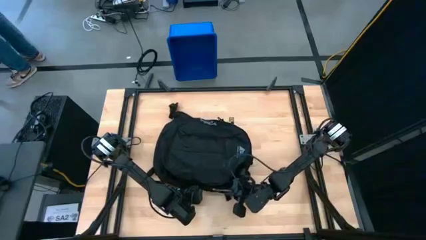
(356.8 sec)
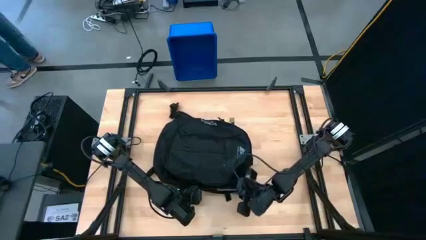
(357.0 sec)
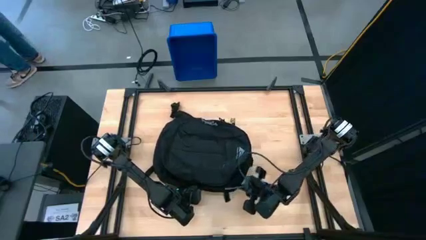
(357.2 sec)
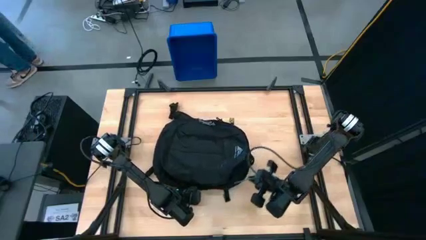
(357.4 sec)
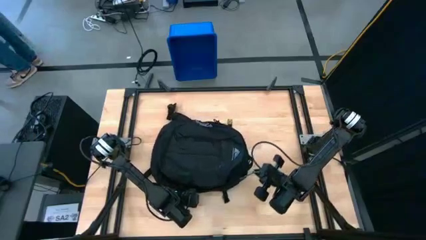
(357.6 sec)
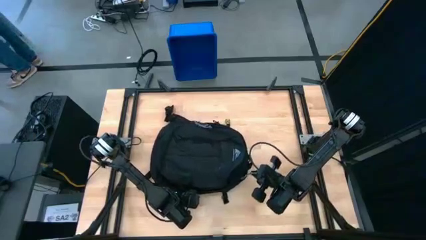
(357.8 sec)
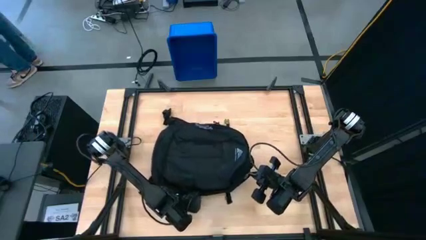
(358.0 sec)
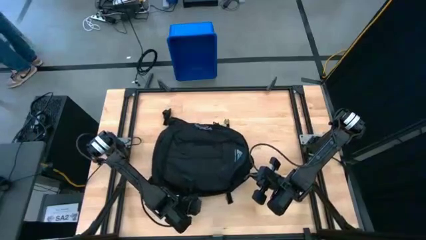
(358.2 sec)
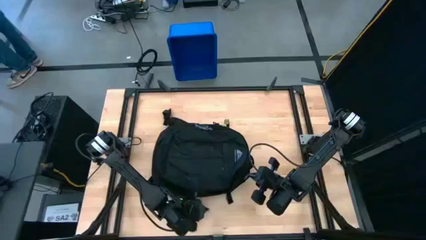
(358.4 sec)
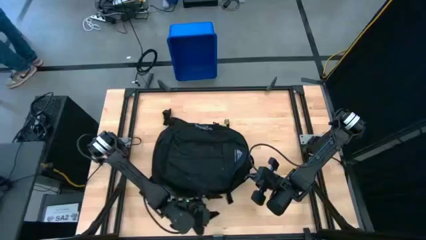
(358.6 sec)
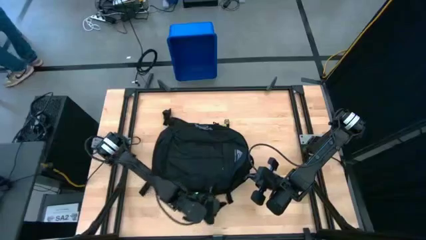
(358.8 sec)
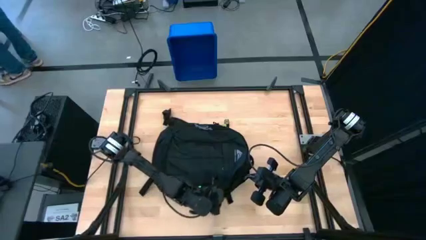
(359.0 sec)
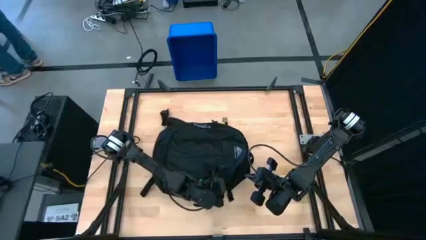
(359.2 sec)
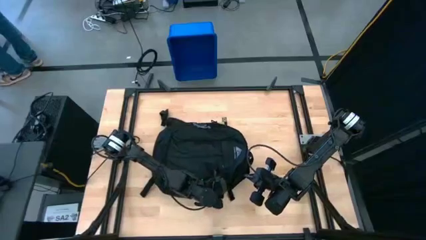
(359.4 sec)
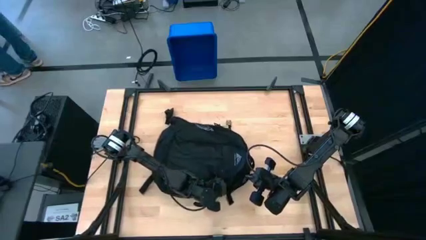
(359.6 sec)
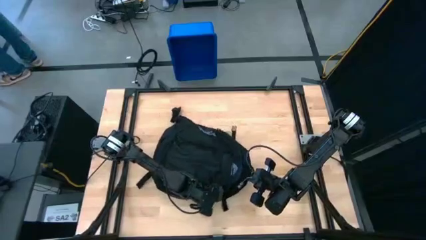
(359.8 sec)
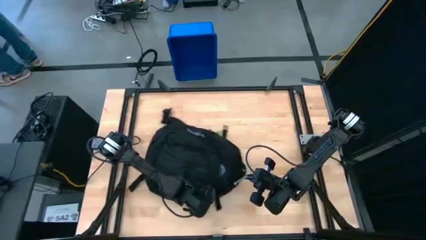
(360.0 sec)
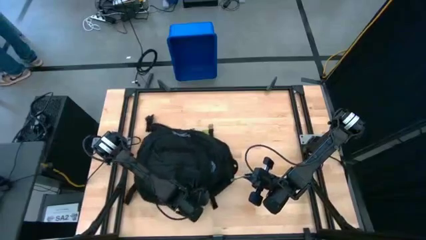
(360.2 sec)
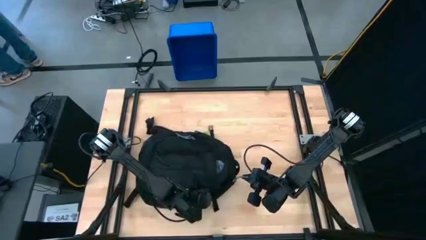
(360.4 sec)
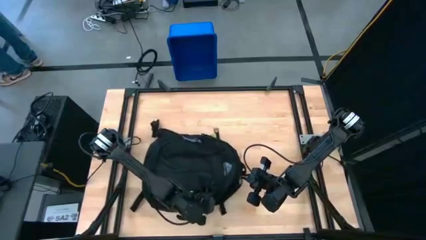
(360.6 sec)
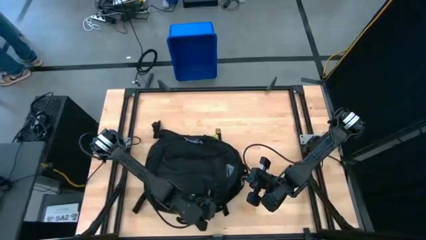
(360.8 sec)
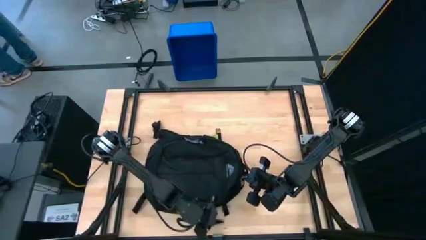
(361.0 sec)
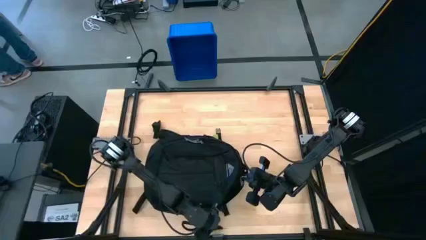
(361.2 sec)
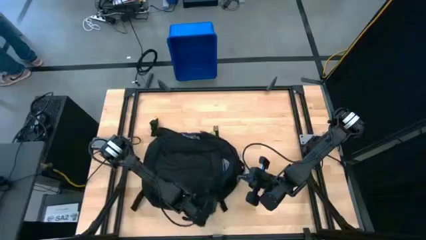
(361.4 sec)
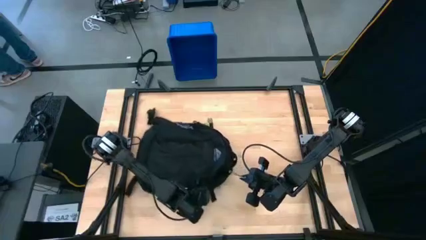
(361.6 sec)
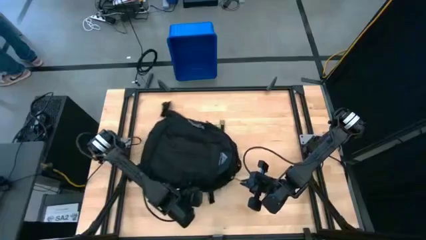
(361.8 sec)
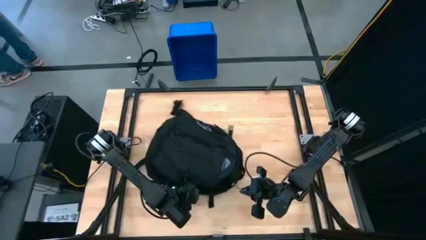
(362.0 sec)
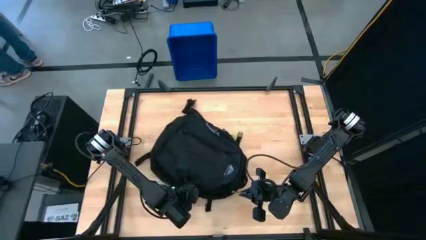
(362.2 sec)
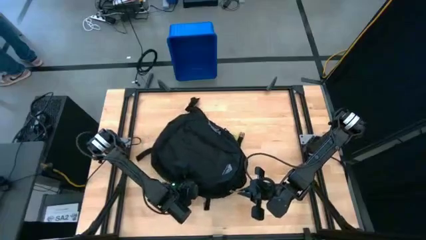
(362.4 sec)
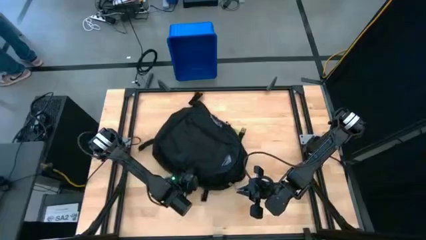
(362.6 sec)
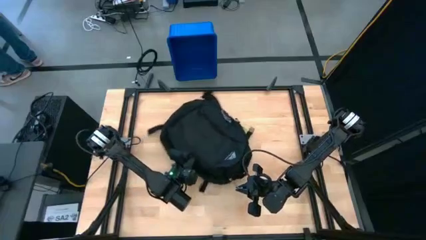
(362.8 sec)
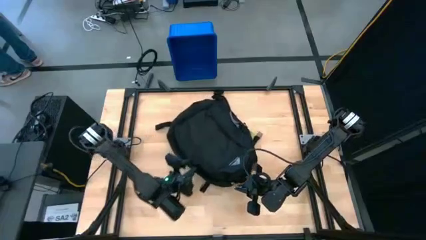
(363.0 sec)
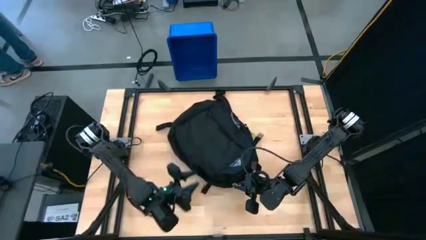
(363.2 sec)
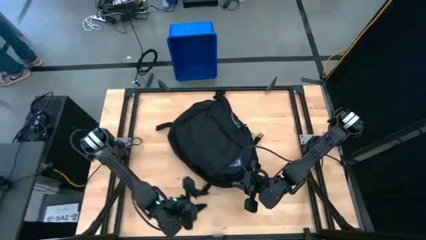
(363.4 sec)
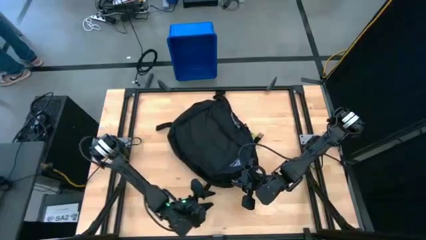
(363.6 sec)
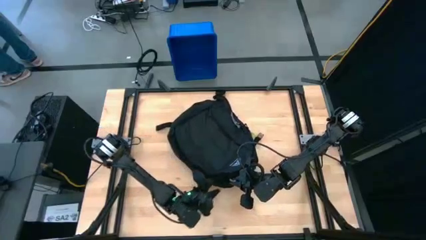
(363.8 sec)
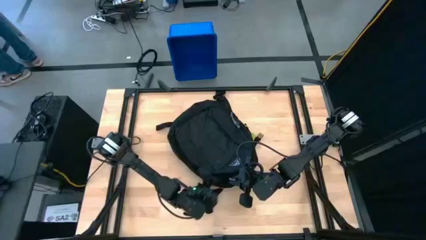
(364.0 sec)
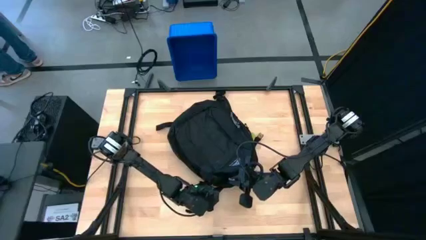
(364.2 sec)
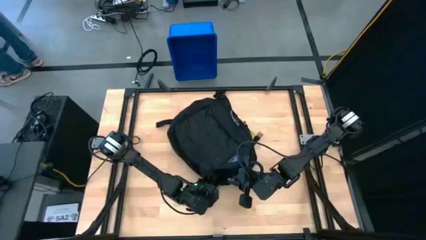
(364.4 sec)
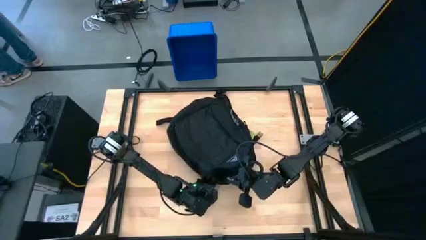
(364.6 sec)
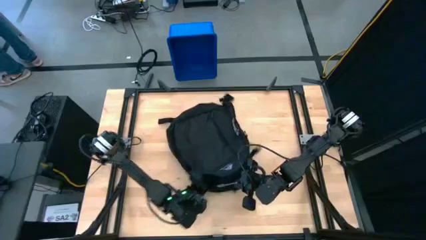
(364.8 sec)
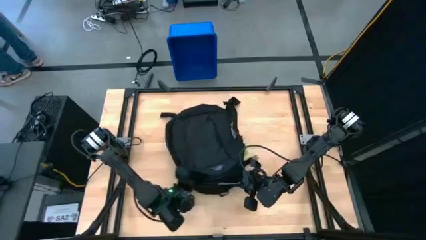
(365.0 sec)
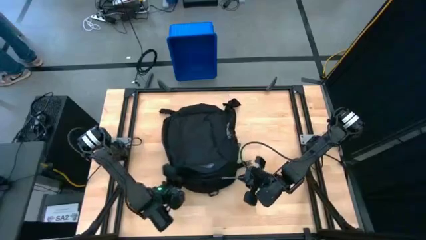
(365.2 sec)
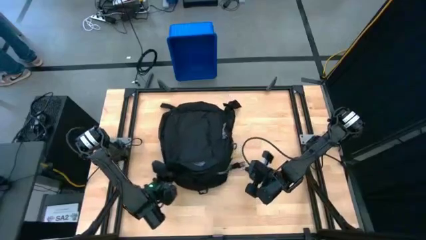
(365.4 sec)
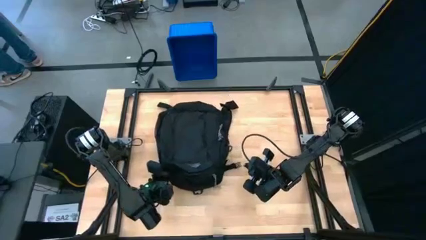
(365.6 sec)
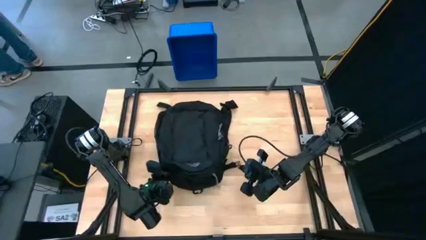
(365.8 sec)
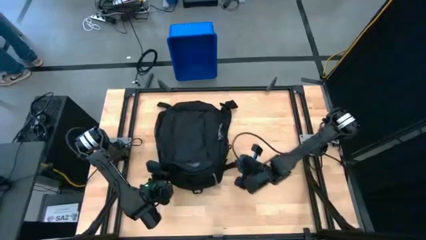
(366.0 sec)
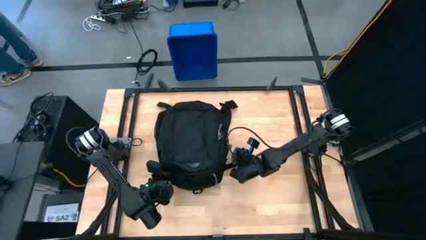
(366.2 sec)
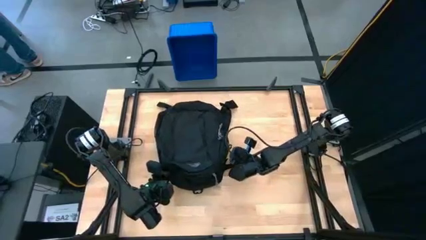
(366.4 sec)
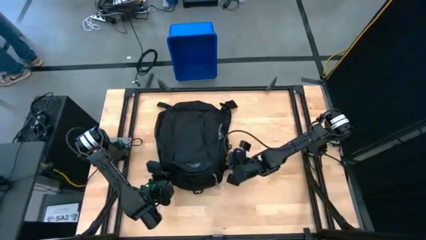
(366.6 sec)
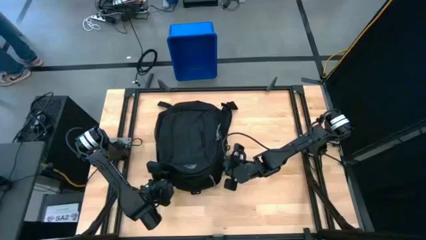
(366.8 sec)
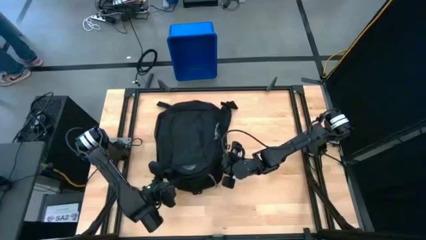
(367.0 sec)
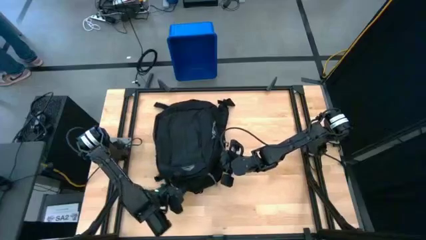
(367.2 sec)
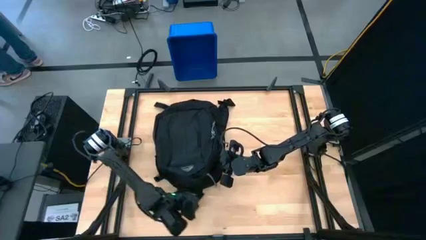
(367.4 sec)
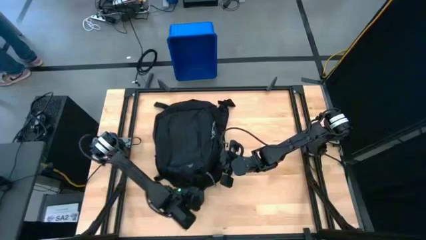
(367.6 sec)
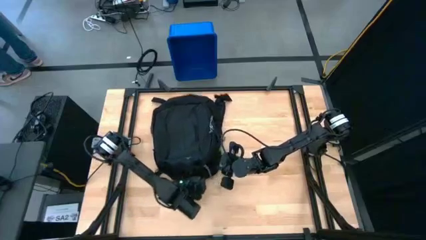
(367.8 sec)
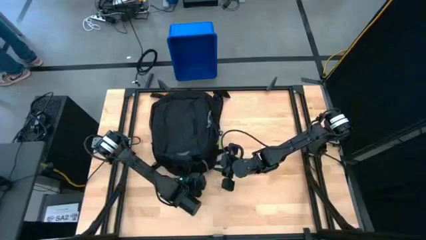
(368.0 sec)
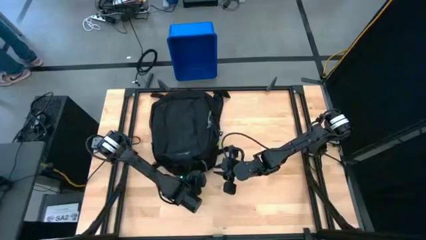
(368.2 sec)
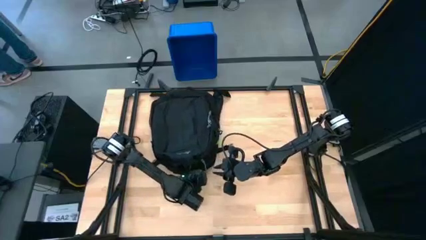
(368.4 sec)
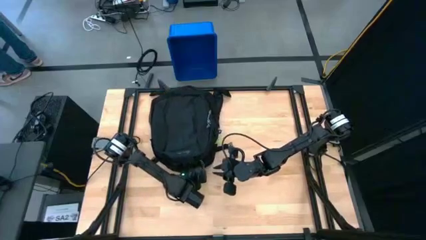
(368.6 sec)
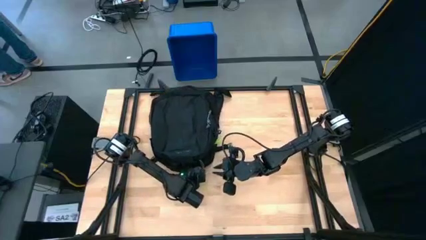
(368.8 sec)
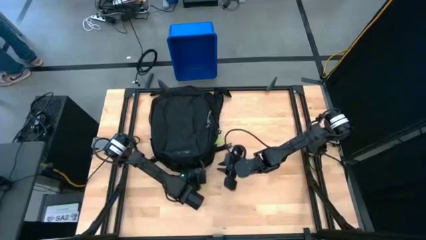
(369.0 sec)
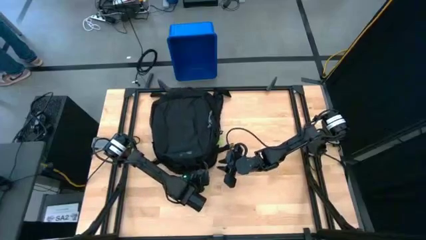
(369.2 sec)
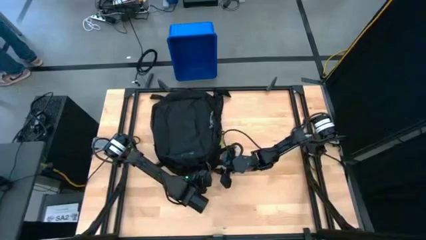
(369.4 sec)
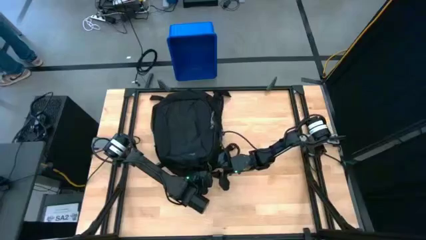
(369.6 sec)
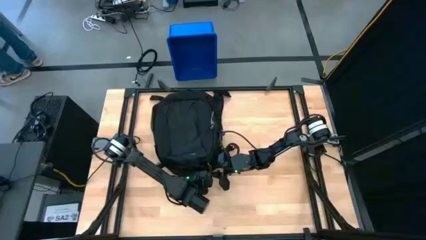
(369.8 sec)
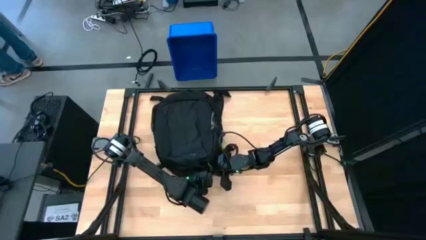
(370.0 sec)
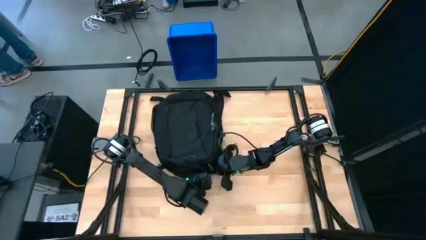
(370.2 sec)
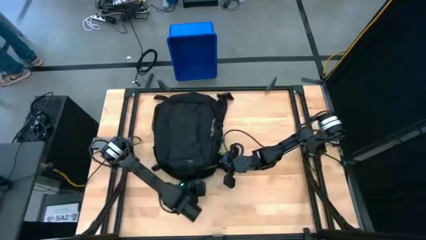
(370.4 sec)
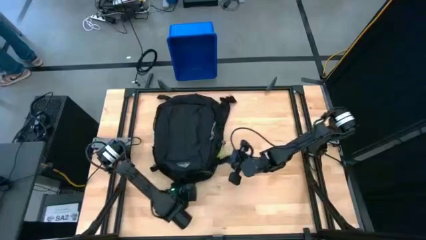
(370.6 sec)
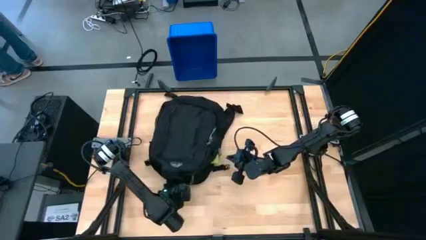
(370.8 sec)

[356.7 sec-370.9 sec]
Task: Unpack backpack
Close the backpack

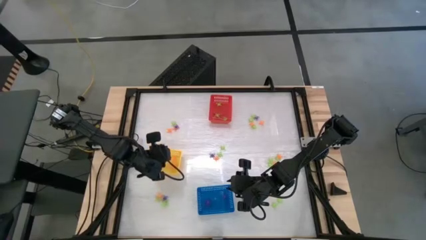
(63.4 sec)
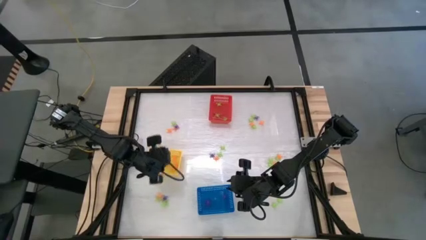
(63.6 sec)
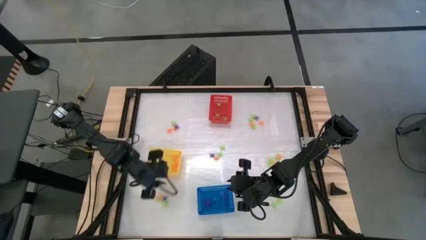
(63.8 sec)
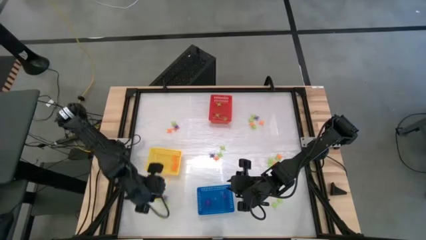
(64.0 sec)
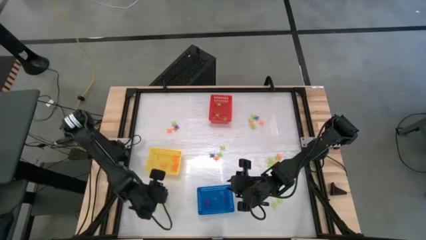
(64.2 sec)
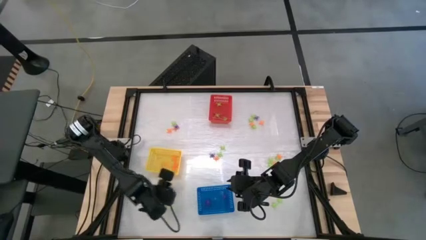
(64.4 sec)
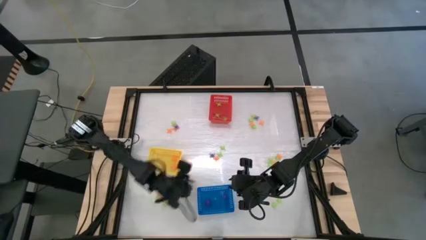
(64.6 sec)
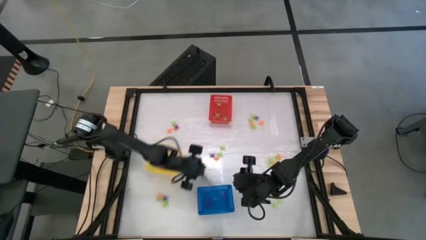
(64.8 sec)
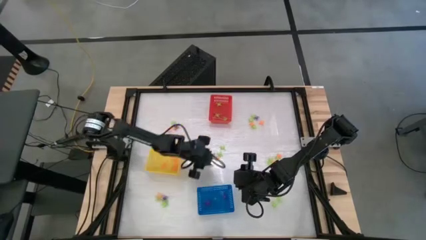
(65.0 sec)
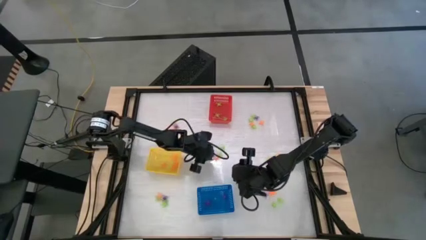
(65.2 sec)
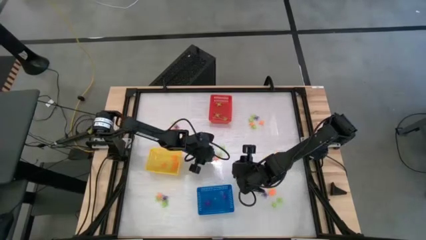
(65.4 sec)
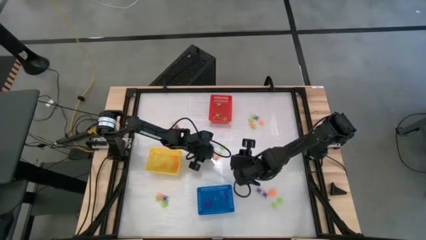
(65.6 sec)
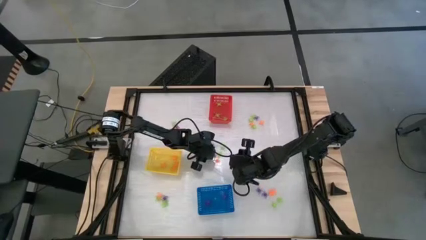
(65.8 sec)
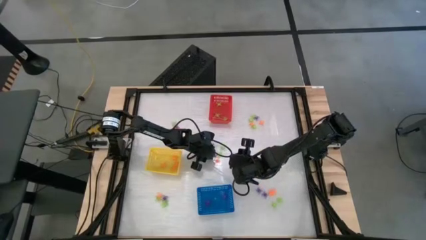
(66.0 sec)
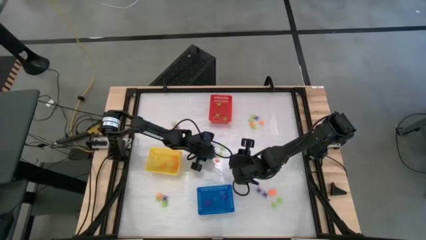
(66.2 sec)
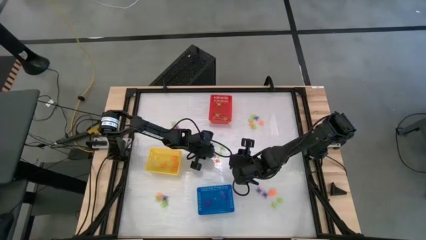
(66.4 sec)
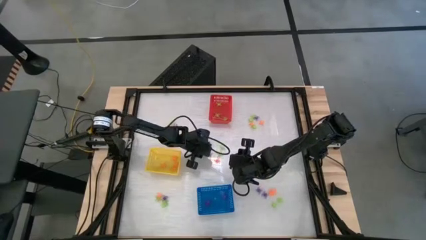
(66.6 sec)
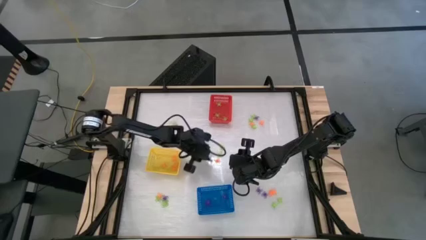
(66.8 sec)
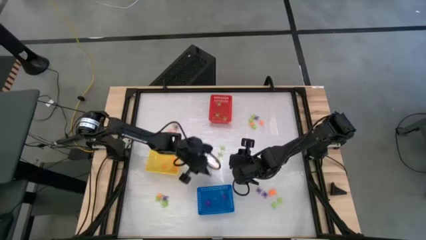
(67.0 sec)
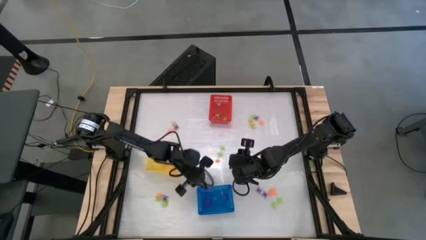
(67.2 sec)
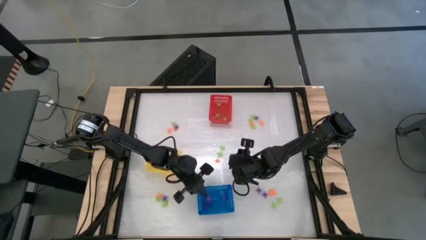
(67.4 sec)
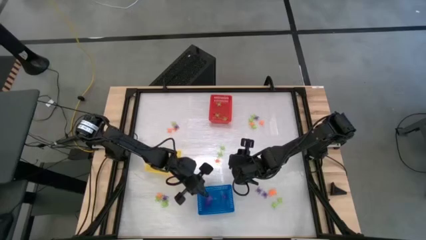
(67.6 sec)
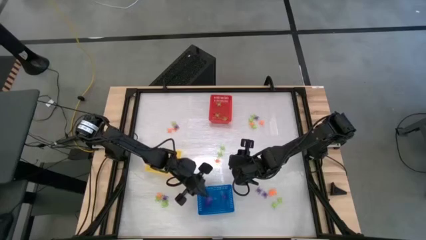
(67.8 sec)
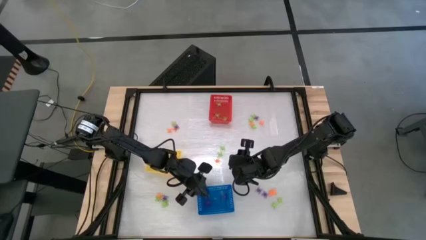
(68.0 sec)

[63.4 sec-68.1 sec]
Task: Sort Halloween decoration
Put the purple spider toy into the blue basket
